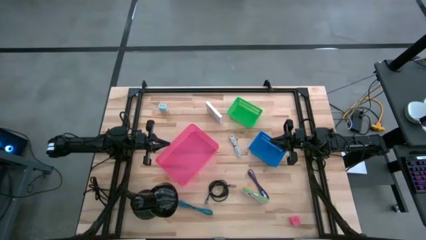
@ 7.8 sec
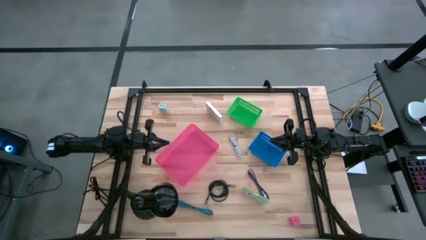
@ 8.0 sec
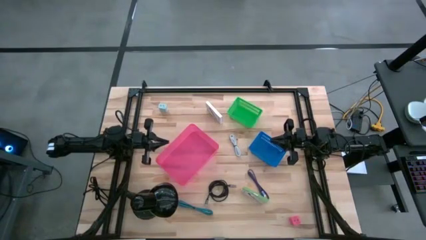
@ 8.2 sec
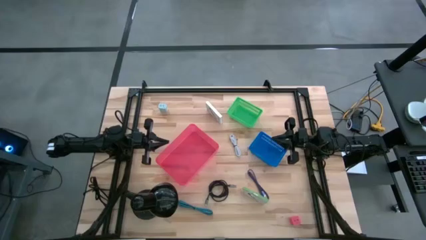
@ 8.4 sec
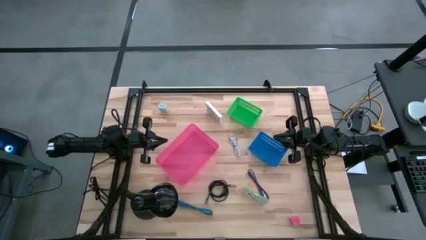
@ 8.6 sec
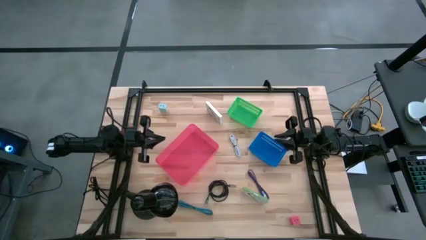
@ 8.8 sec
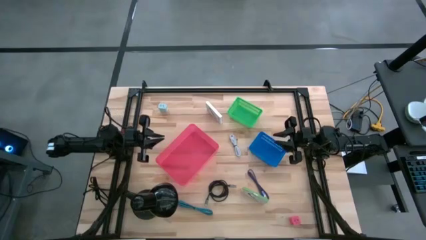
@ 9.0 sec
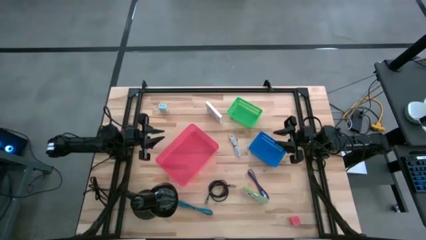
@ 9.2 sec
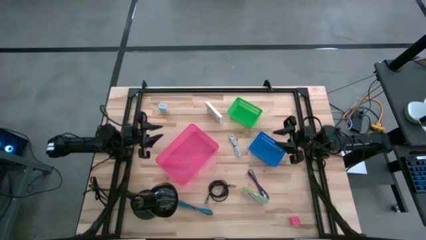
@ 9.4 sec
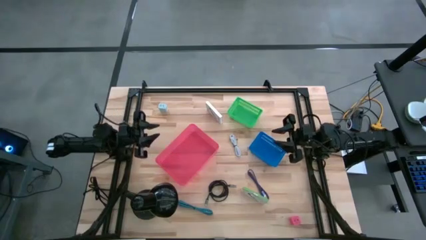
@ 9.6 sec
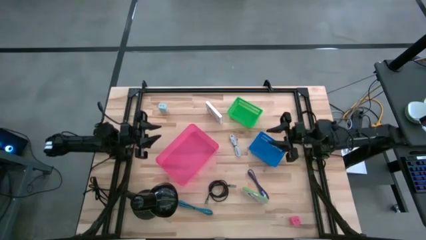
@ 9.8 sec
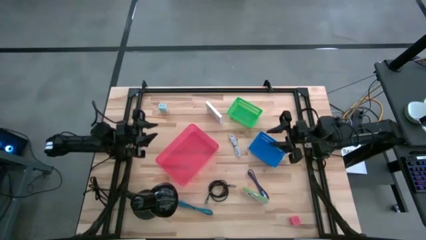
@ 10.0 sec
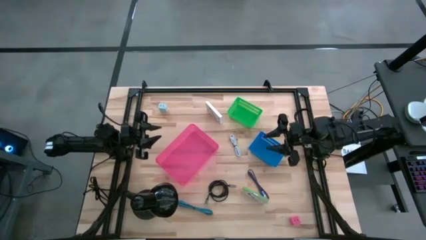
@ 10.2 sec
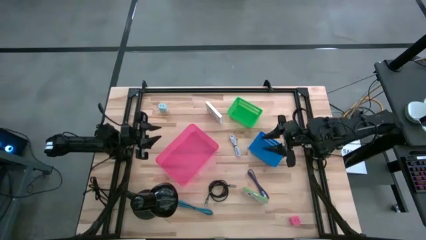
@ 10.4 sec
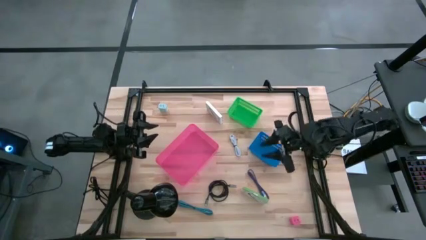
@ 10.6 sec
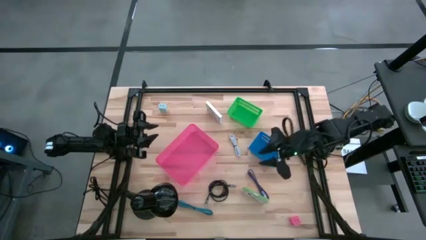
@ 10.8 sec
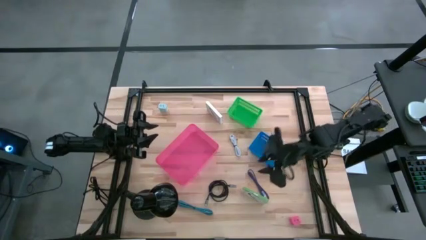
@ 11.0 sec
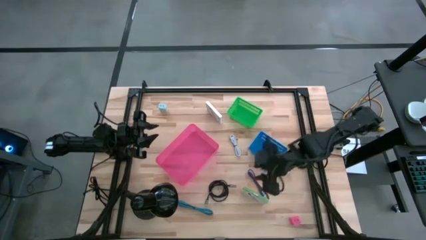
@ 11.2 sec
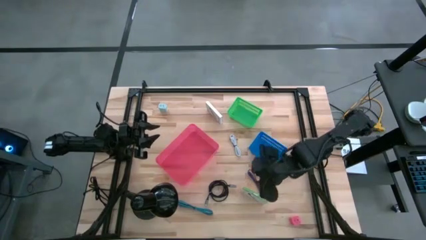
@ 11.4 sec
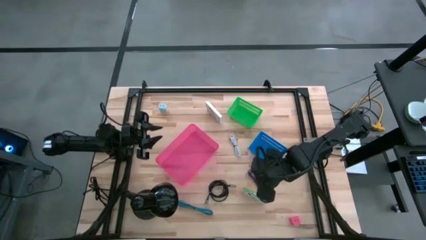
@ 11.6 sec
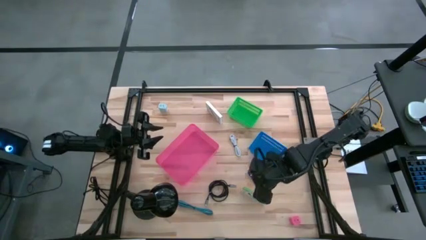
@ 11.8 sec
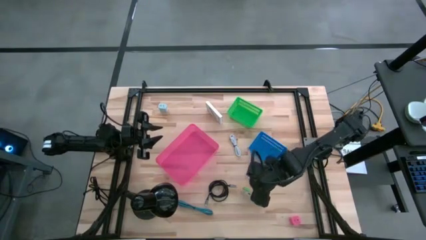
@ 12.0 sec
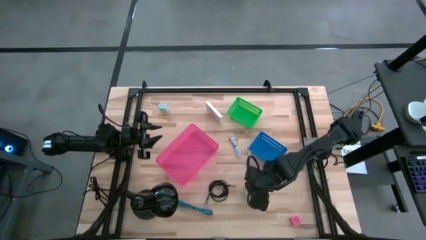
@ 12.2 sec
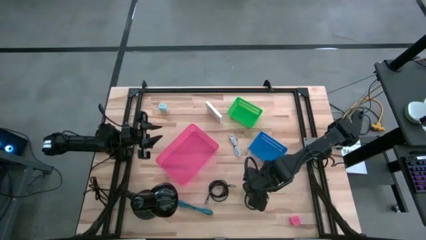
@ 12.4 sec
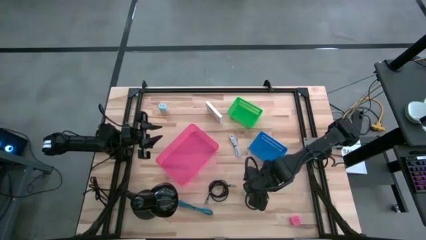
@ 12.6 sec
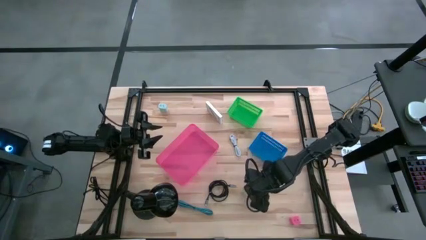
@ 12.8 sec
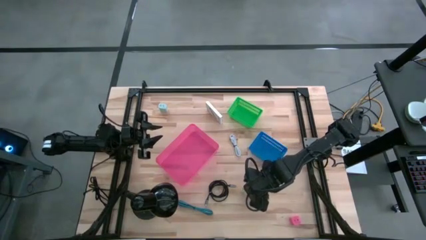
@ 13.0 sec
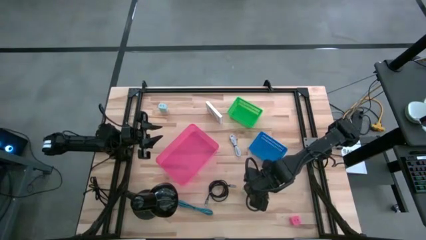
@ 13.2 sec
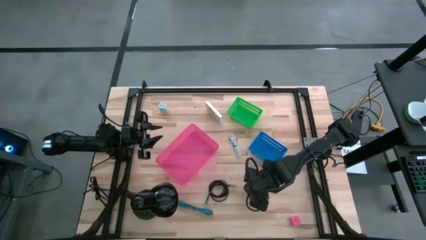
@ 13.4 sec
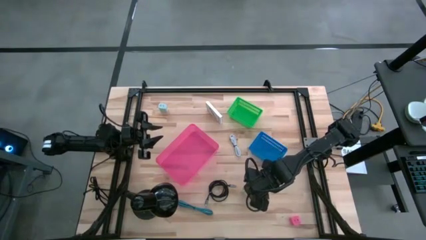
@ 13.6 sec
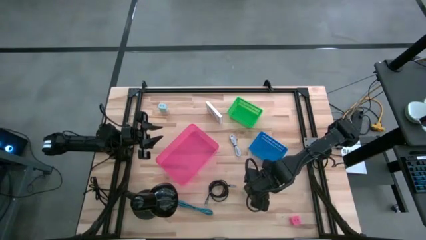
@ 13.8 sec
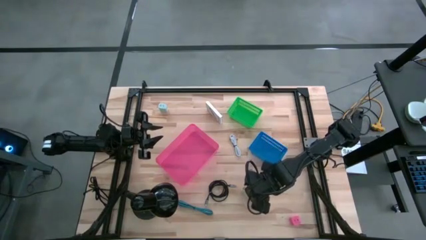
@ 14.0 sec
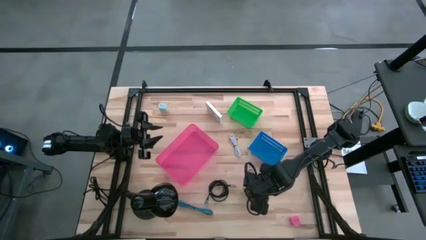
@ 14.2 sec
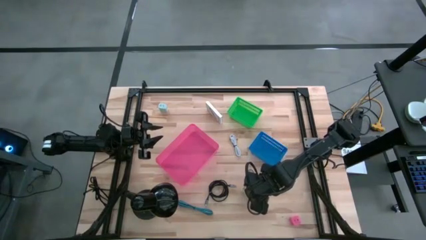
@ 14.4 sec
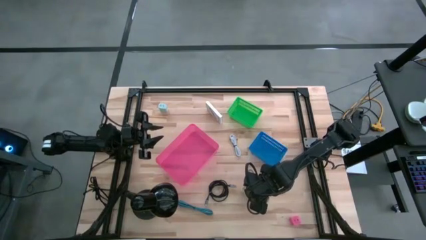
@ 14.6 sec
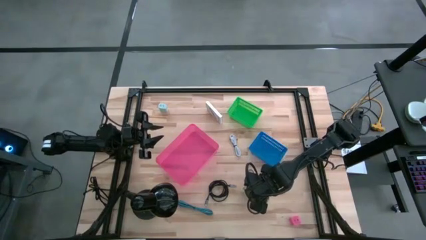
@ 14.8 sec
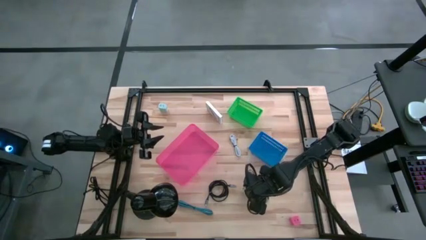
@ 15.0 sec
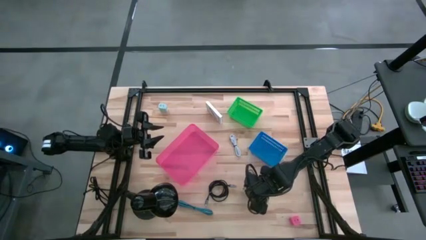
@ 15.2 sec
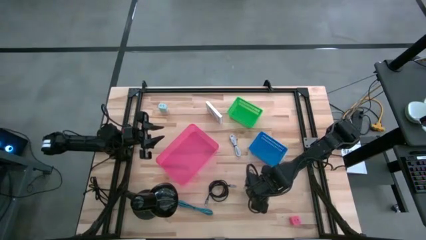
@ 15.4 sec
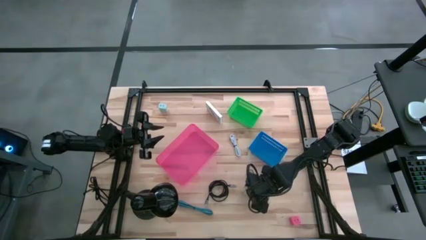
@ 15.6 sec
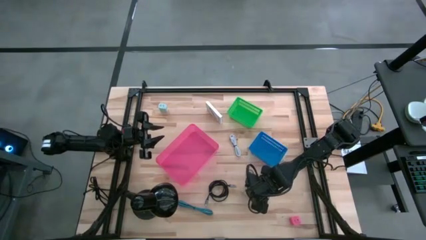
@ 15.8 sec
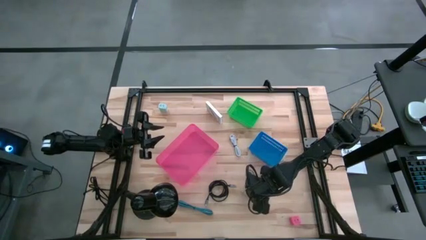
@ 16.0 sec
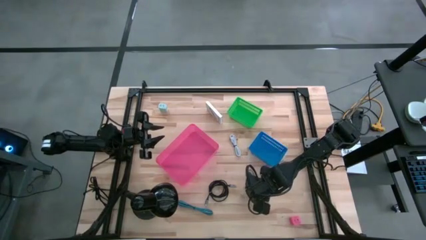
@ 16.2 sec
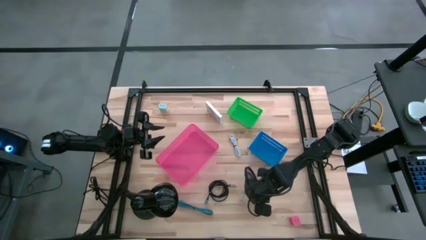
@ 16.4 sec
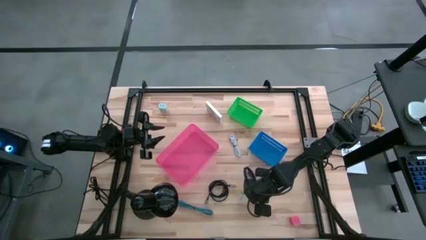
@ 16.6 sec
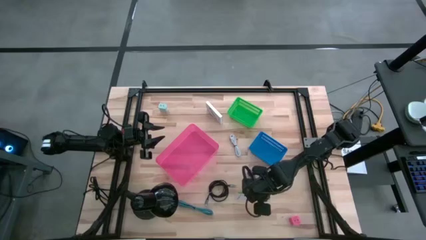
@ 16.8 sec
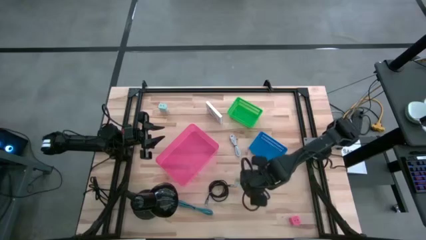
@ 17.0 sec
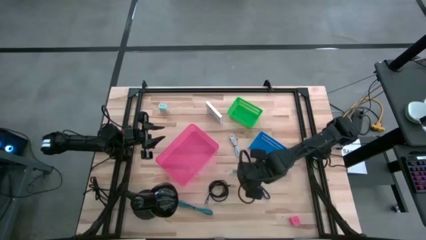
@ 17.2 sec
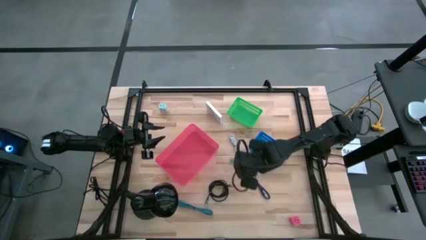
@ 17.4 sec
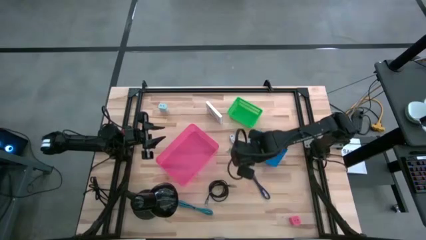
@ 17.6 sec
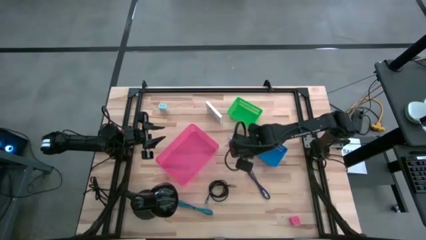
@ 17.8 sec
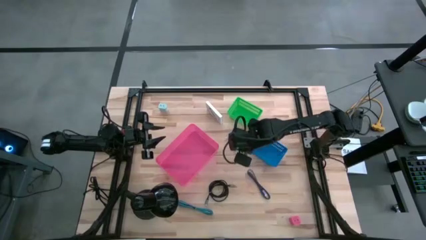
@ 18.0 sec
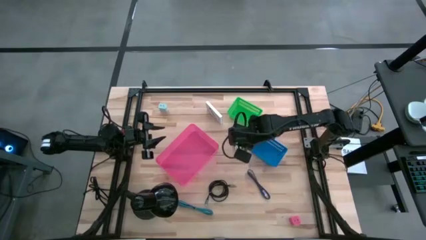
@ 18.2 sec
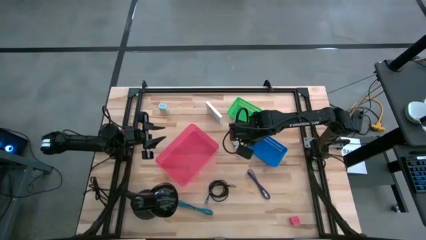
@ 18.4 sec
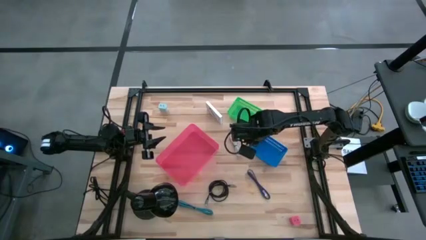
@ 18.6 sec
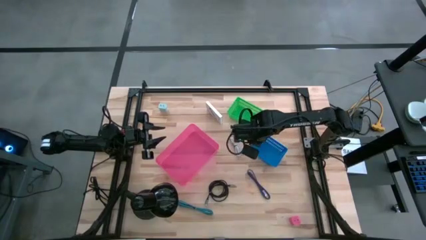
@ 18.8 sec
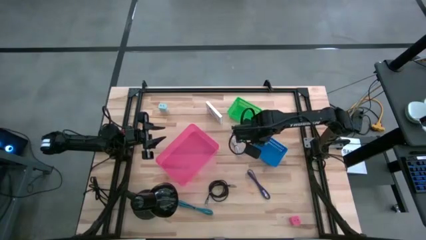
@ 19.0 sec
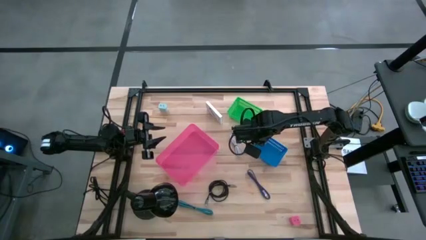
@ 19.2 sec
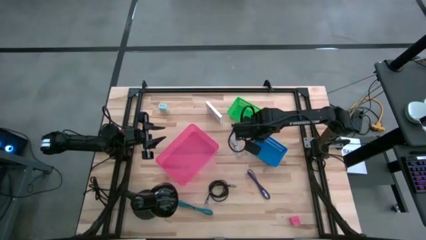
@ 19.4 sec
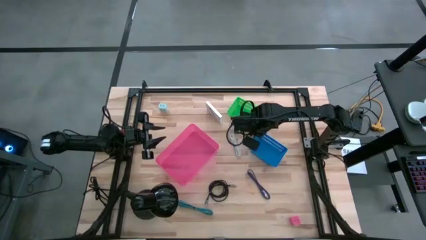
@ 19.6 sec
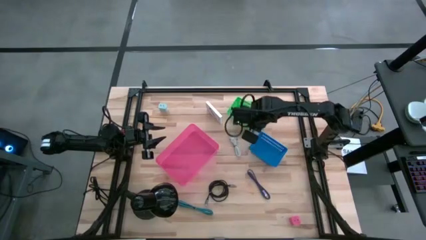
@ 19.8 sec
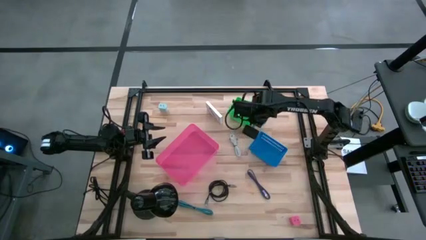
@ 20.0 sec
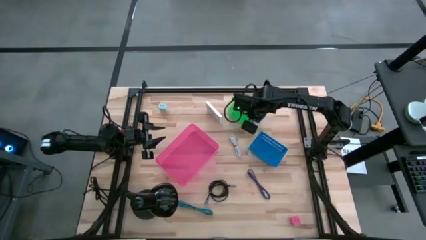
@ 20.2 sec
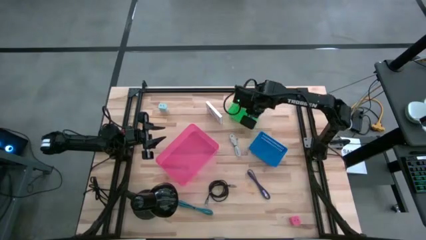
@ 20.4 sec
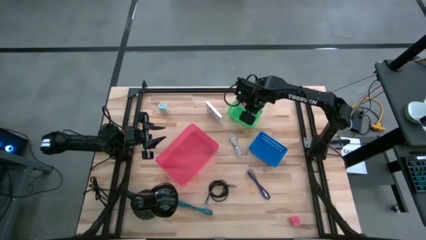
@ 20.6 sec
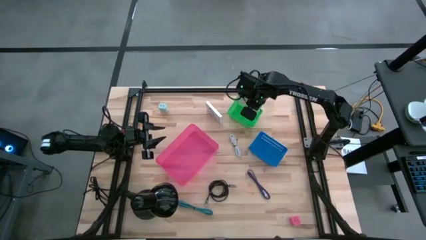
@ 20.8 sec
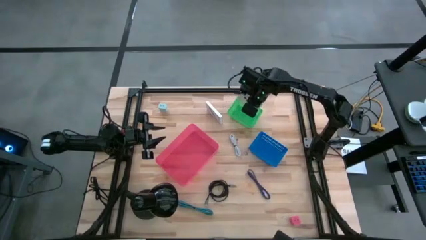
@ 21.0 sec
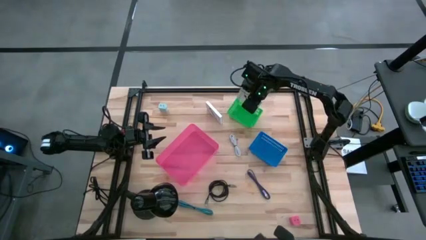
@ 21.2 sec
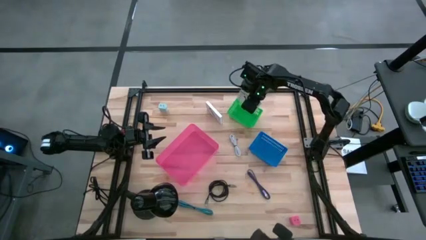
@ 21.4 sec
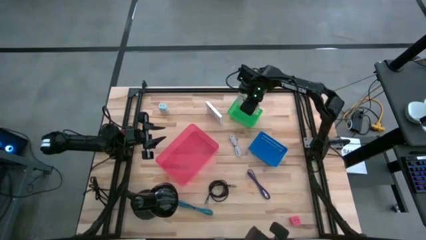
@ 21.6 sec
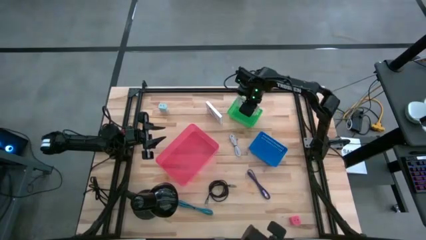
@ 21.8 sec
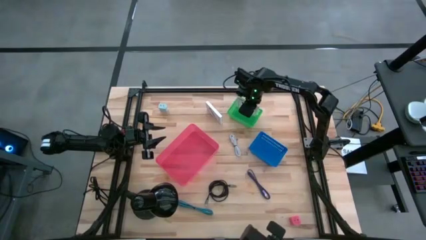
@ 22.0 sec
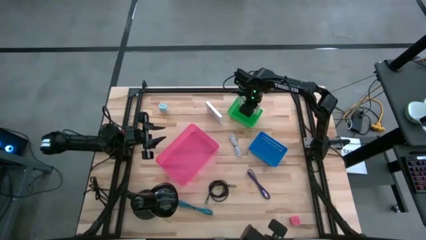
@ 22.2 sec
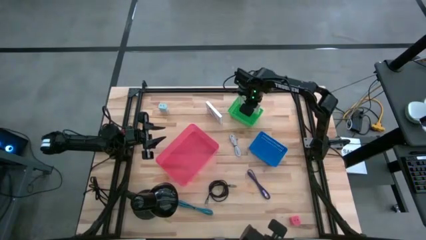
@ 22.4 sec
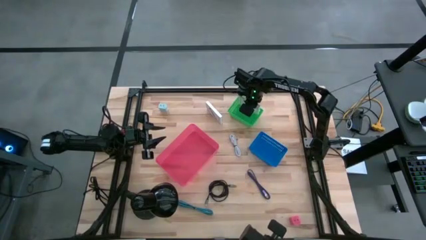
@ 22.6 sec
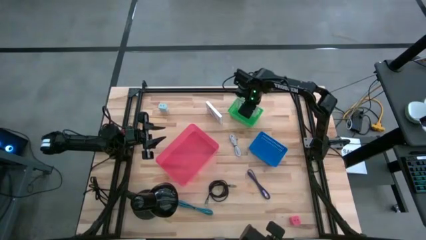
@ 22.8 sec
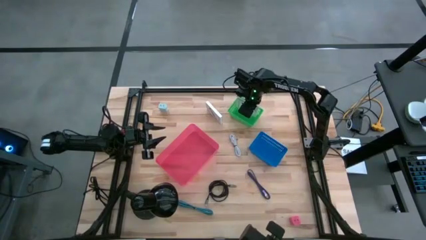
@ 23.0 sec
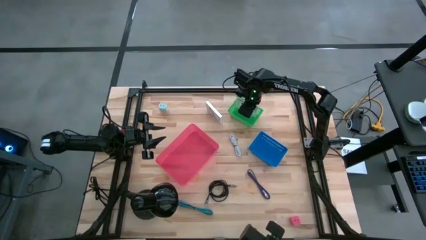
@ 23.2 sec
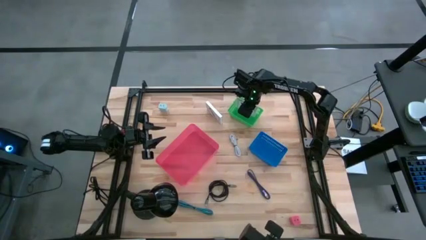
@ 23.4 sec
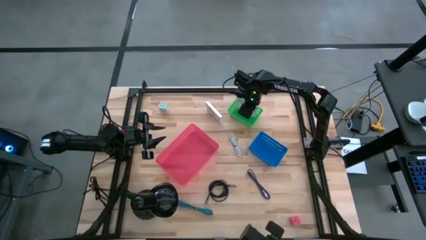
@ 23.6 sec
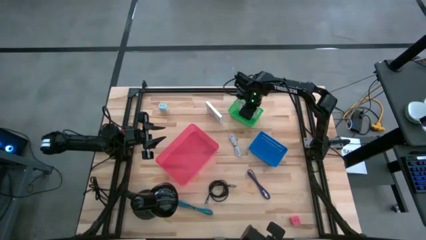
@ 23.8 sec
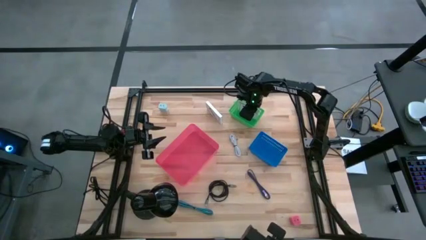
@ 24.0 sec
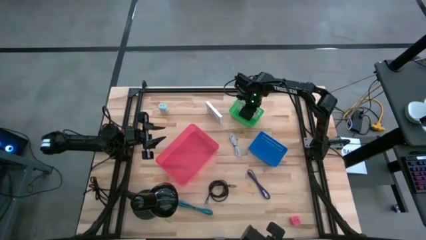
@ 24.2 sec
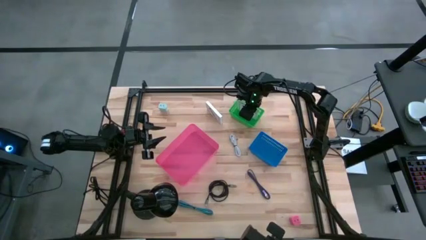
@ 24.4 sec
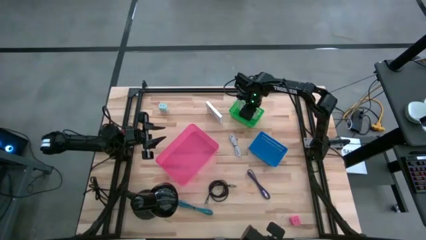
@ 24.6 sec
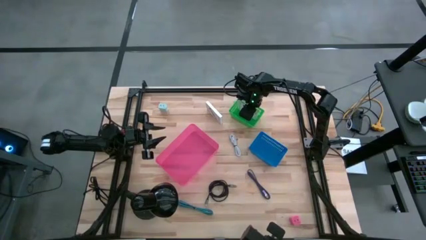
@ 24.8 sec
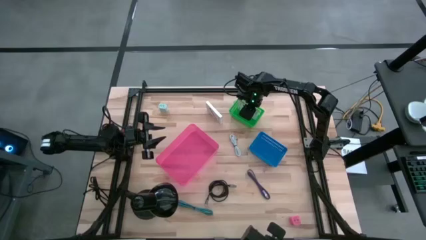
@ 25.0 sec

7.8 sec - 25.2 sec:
Task: Pick and place items into bin
Put the bottom green USB card reader box into the green bin
